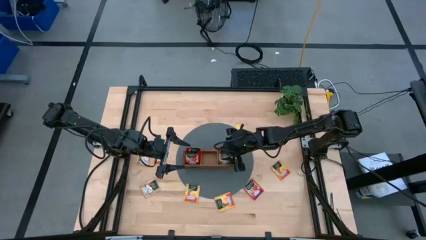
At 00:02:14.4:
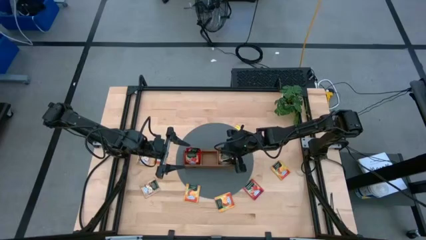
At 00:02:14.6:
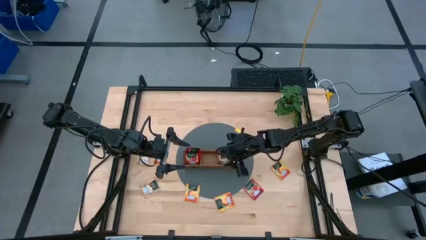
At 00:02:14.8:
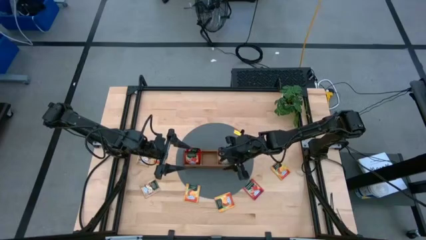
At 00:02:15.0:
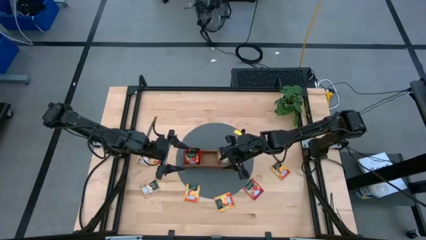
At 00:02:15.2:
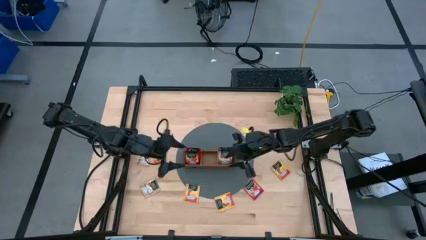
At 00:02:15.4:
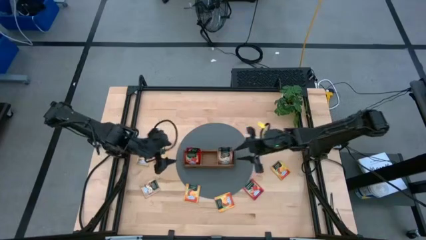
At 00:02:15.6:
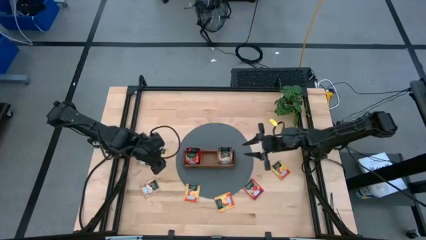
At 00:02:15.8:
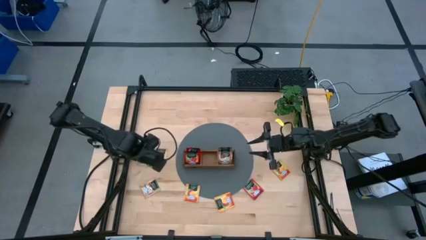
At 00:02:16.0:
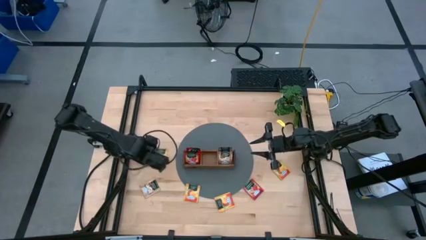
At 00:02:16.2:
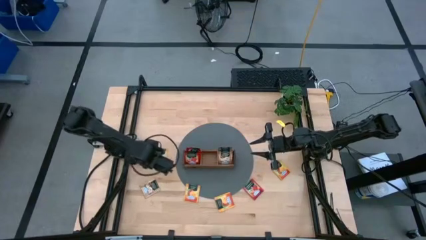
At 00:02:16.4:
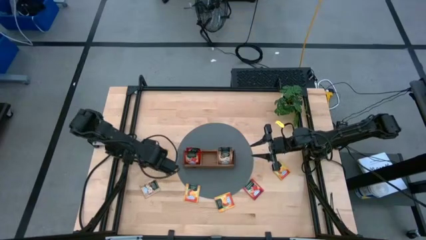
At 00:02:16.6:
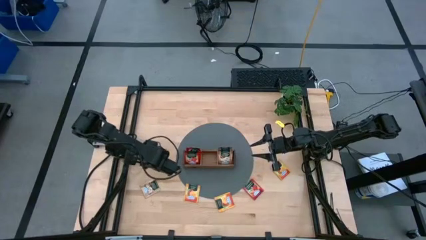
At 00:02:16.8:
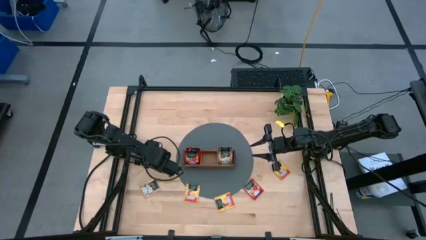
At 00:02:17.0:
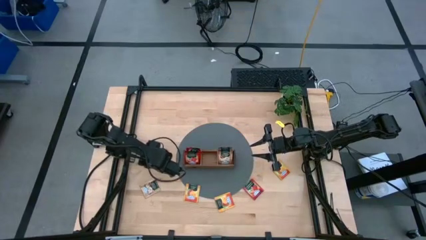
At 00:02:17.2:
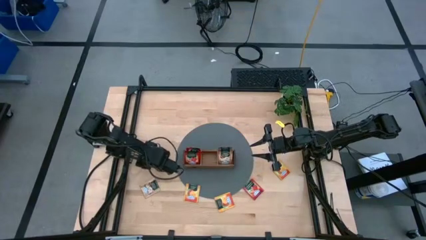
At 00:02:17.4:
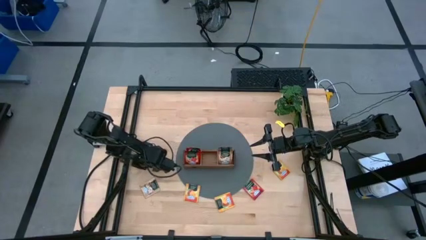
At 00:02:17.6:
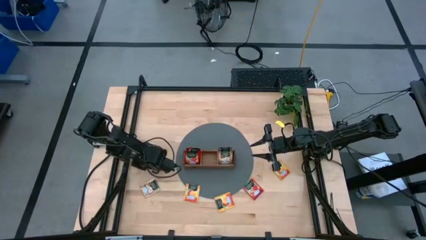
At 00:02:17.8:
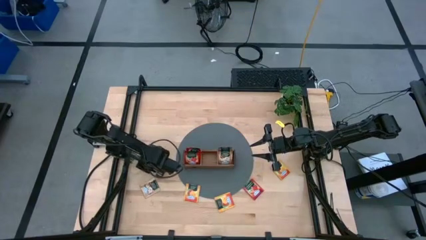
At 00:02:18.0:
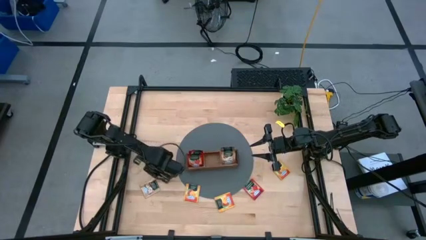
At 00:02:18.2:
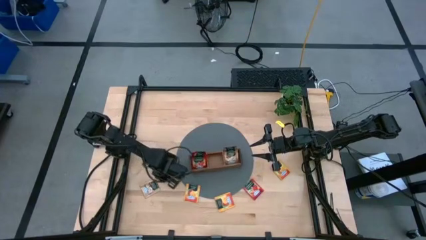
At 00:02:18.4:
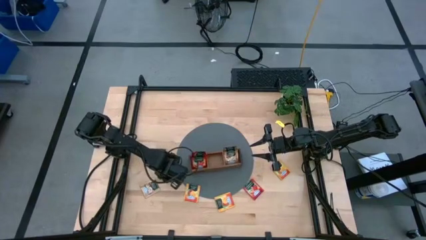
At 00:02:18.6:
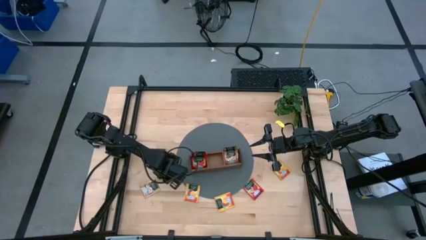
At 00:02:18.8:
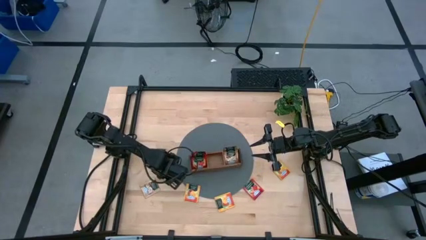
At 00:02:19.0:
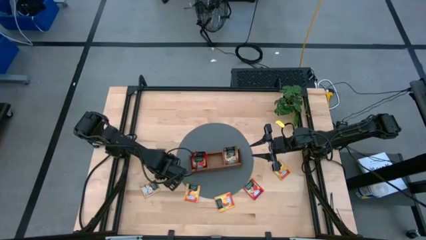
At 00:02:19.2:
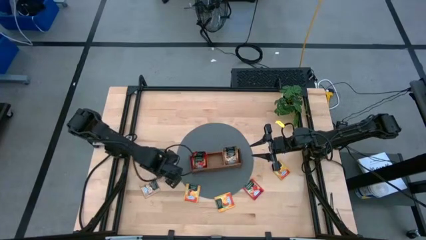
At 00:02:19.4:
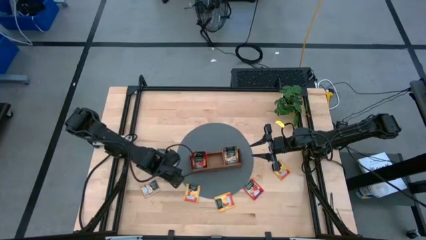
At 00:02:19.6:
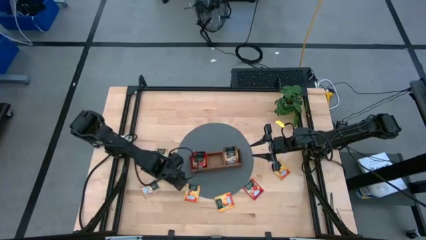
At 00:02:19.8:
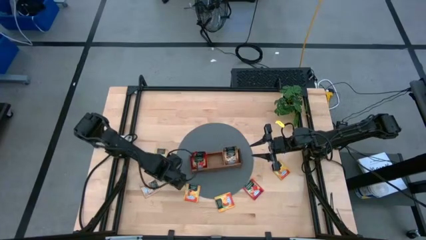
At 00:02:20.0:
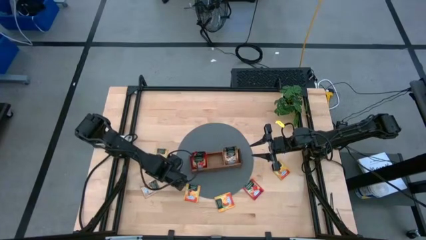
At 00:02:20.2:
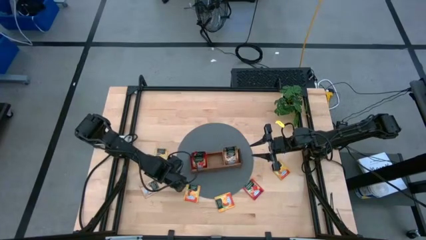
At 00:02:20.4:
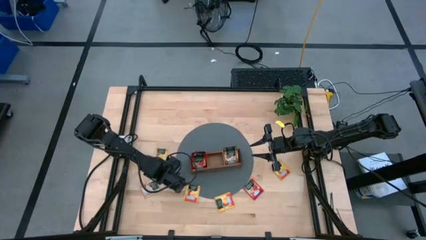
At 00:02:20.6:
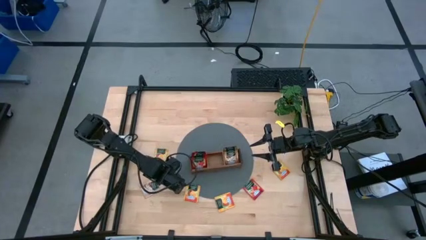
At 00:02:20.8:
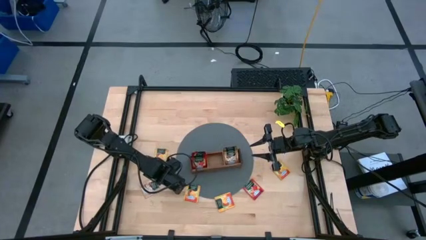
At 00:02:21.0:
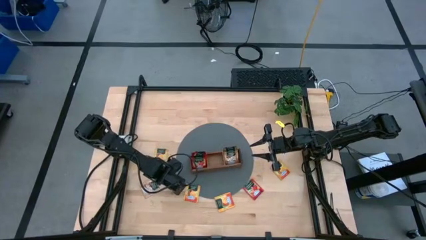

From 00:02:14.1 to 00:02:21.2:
Task: Pick & Place Tea
Put the yellow tea bag into the right section of the wooden organizer

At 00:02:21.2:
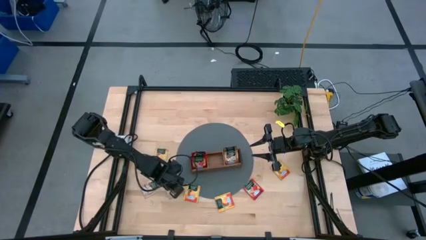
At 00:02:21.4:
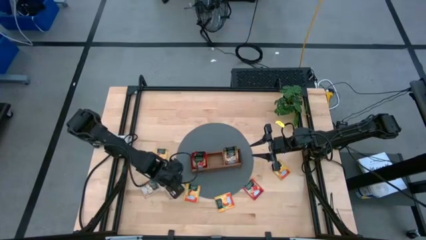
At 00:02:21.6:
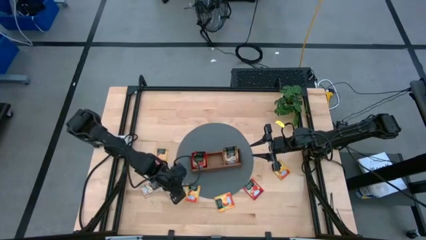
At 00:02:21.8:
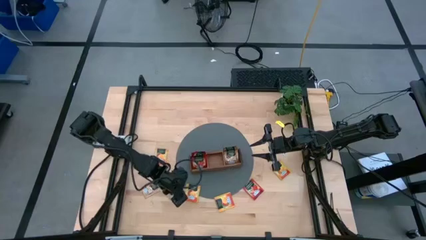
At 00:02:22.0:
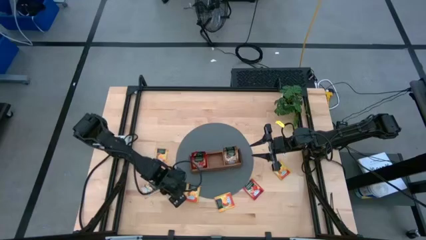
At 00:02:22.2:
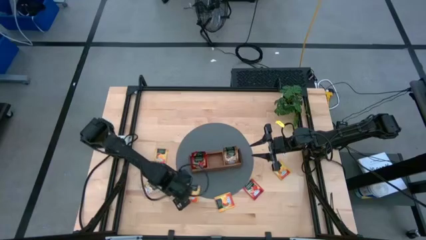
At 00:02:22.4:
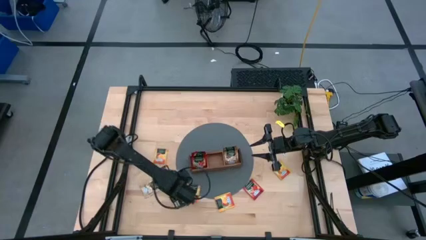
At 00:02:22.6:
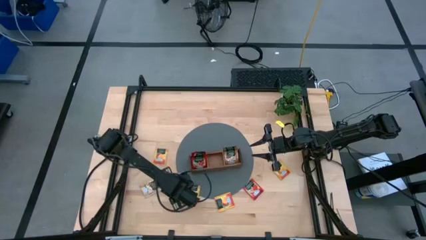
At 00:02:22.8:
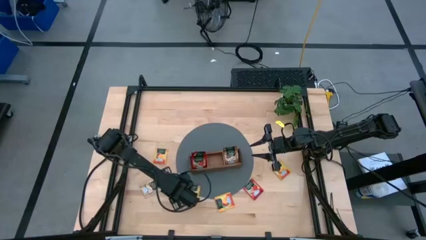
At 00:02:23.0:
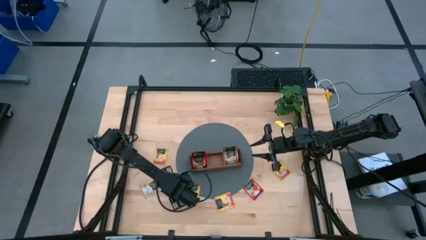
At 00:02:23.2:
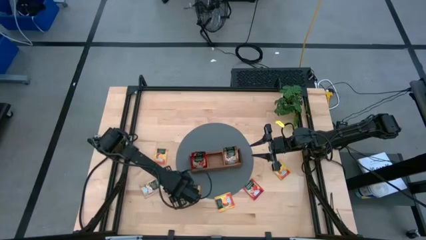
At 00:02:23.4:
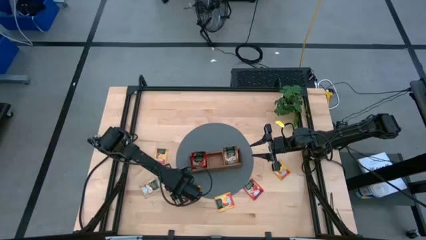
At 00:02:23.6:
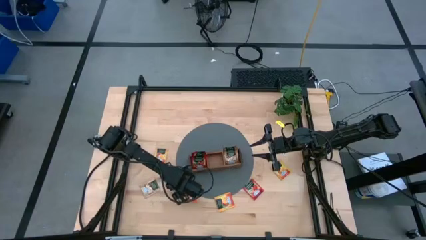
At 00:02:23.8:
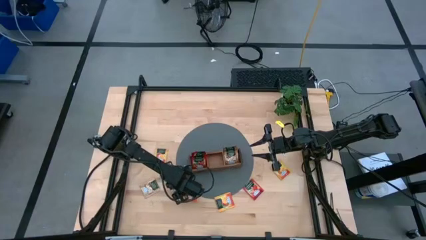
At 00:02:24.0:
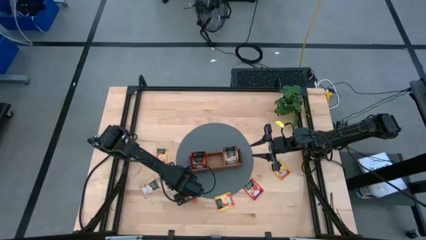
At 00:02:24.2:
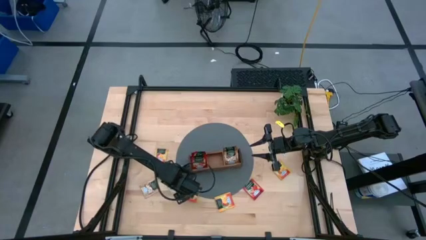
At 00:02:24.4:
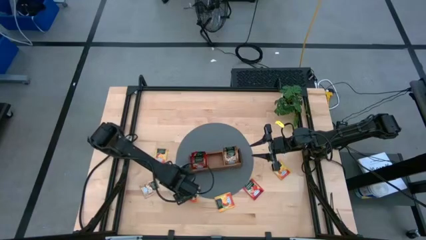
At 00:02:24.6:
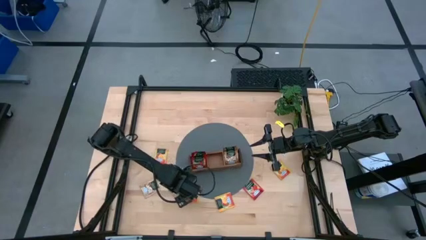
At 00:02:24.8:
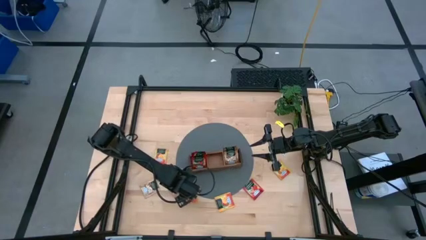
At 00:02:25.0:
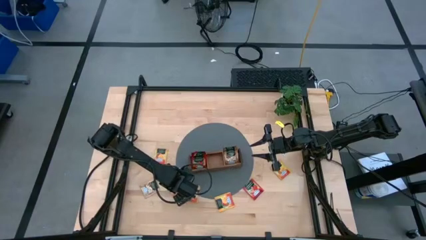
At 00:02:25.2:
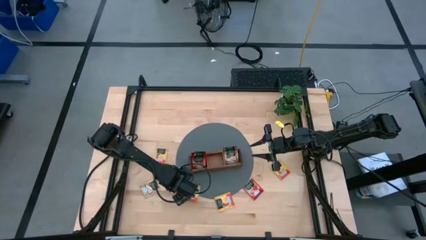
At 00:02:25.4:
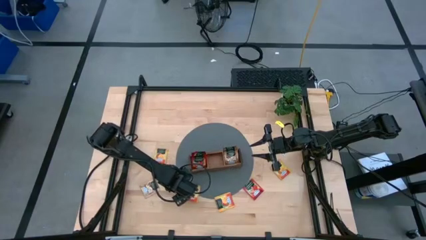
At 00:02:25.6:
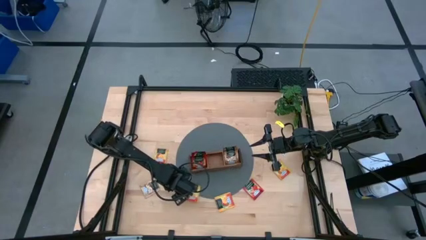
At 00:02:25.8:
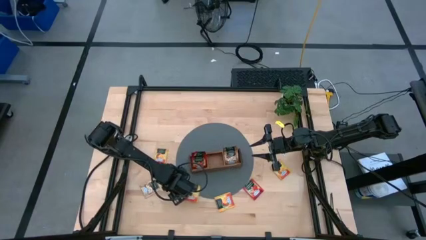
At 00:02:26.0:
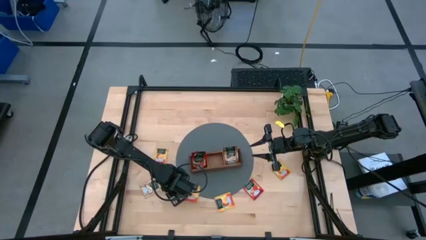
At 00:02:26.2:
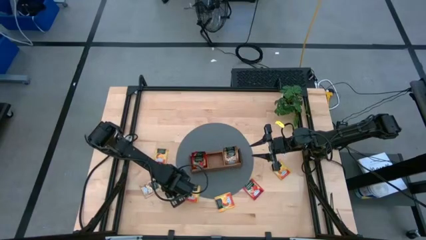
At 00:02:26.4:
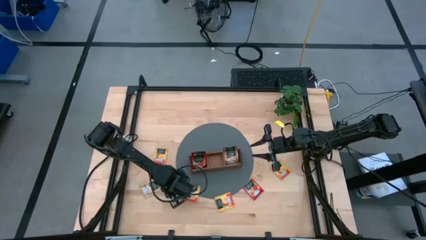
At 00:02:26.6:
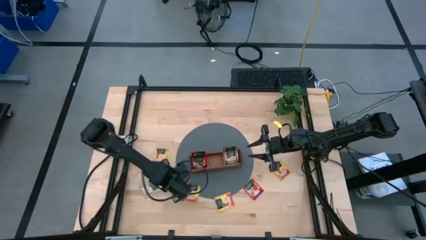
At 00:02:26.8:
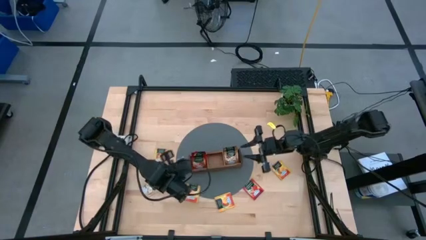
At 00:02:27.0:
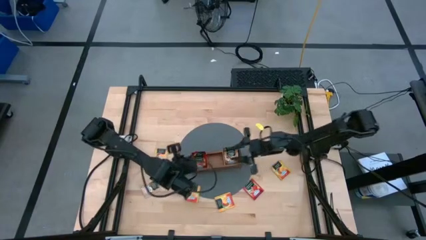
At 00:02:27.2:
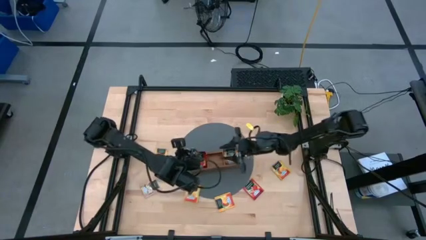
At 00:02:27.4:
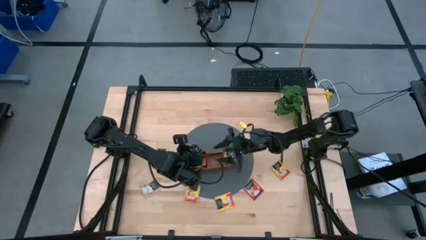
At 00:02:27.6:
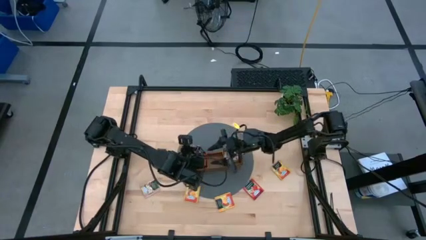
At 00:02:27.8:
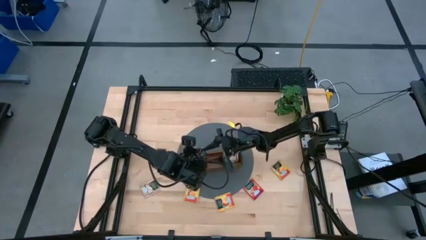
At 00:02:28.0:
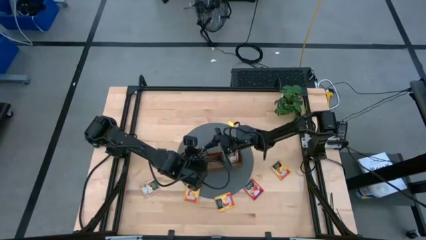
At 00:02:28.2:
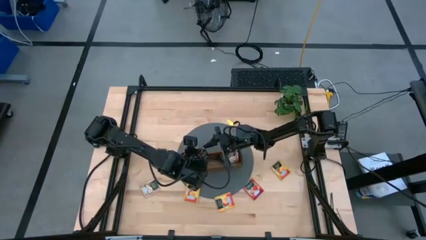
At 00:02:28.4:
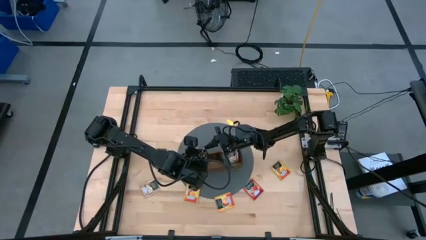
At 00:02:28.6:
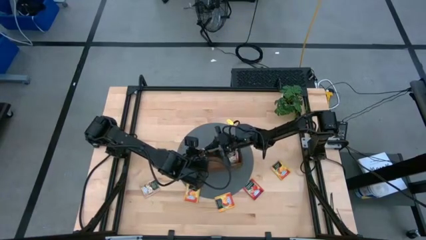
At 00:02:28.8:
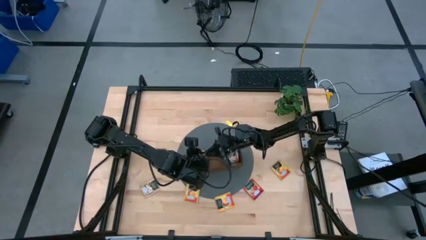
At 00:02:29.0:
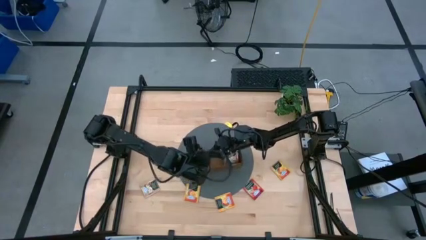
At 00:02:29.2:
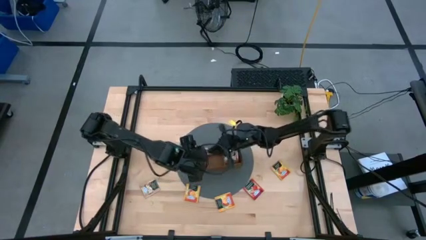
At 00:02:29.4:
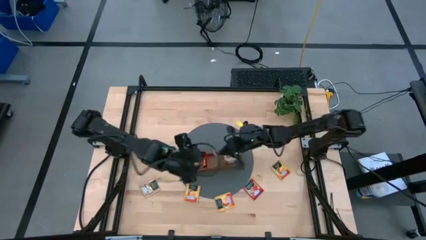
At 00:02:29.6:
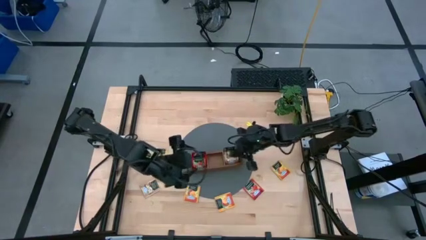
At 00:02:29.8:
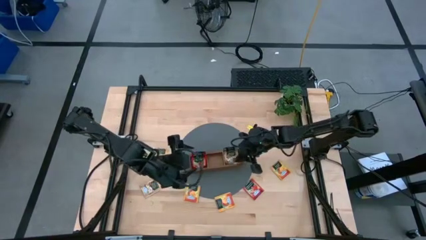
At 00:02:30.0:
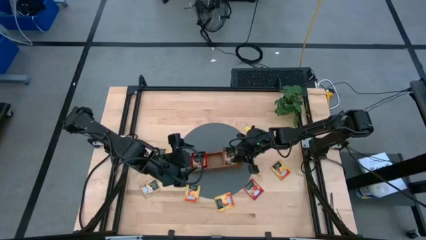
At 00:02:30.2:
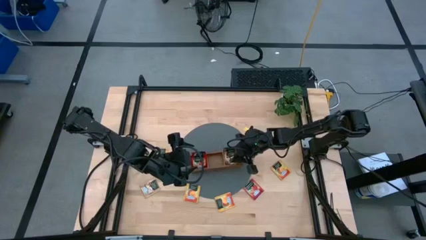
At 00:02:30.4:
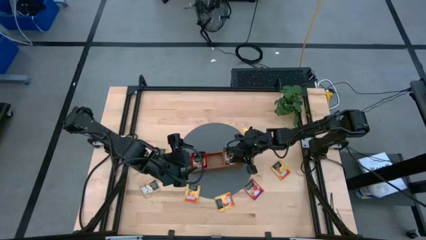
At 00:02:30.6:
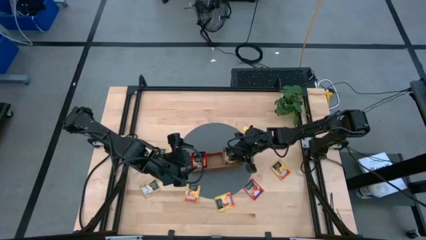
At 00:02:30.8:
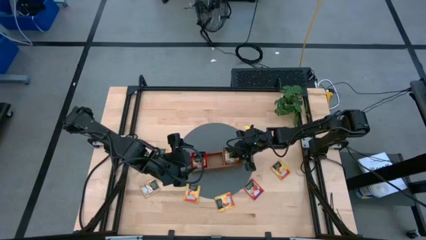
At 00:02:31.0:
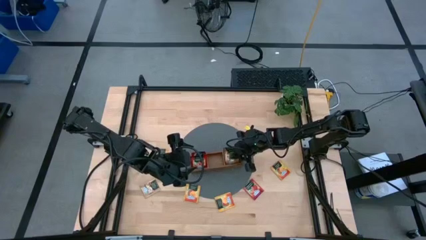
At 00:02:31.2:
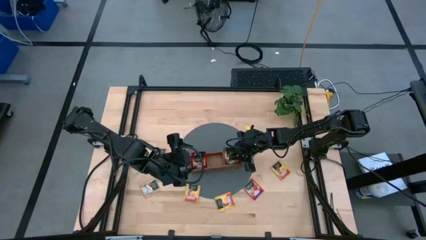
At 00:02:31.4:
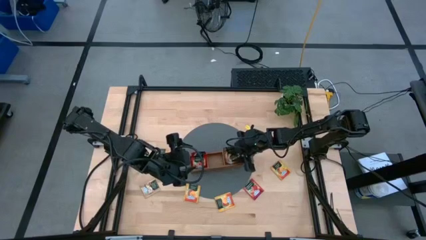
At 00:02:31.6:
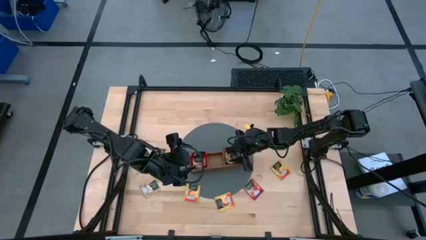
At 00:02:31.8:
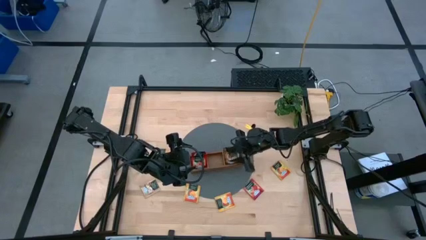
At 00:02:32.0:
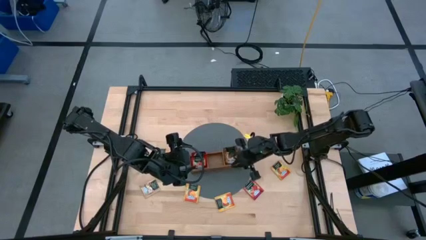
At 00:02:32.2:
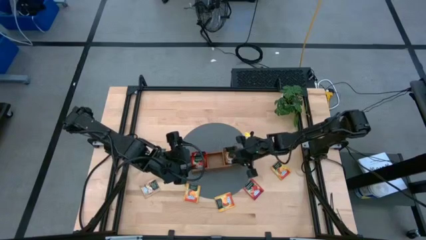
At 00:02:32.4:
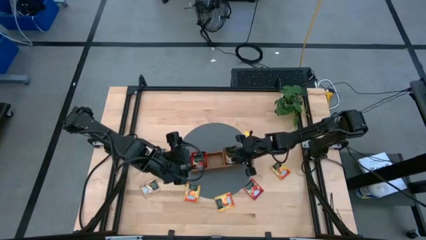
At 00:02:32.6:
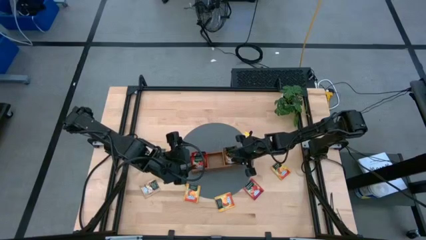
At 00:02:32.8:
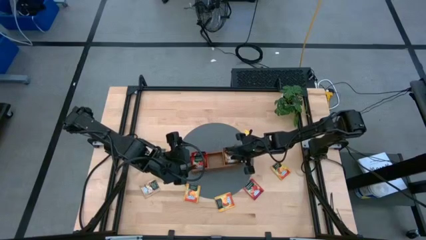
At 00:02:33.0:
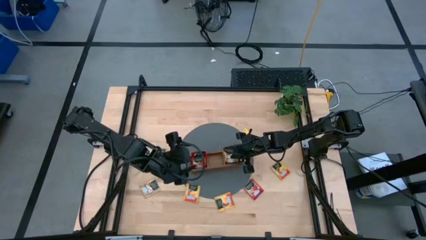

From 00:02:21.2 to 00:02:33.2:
Put the yellow tea bag into the right section of the wooden organizer
